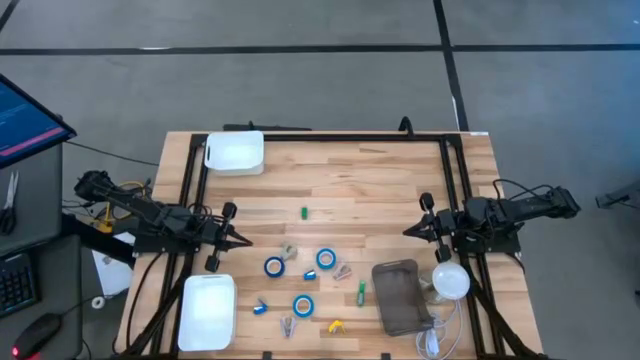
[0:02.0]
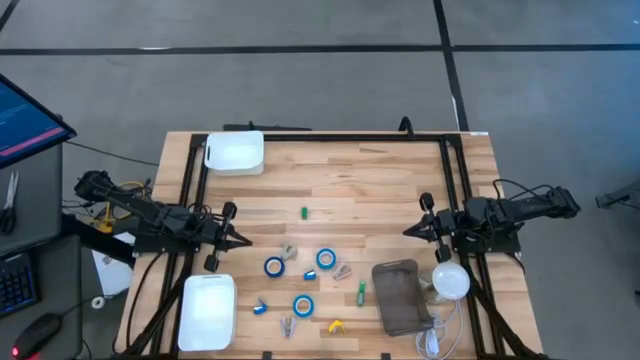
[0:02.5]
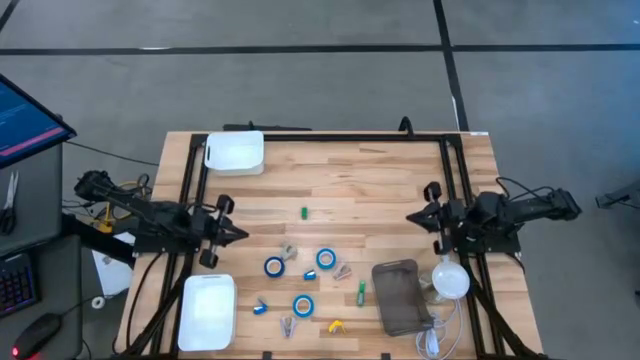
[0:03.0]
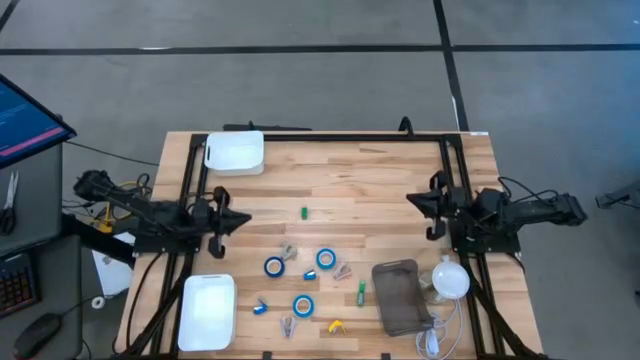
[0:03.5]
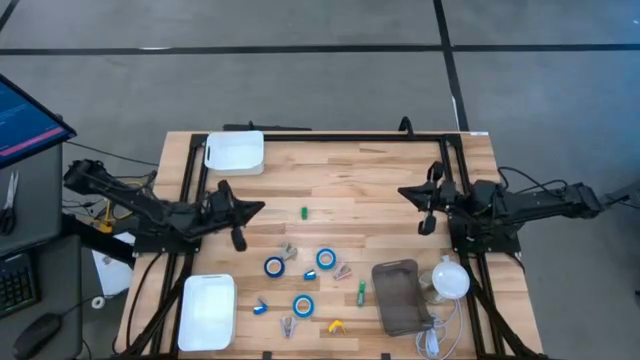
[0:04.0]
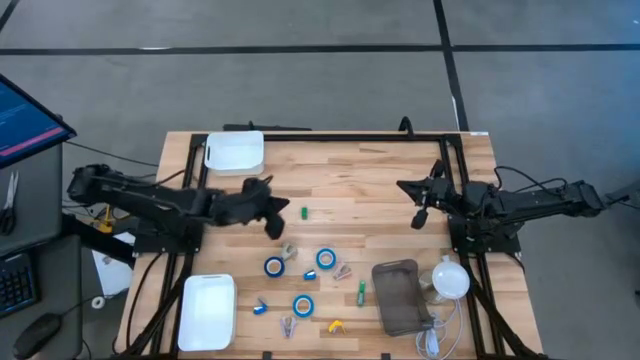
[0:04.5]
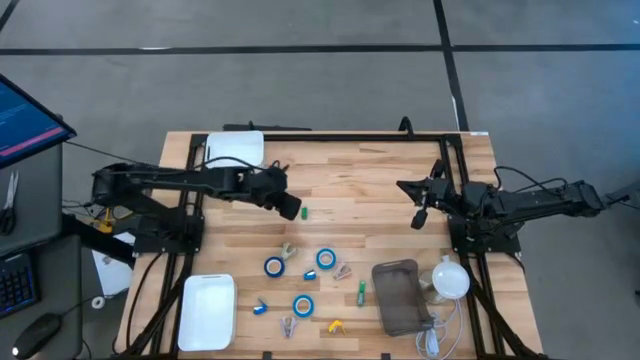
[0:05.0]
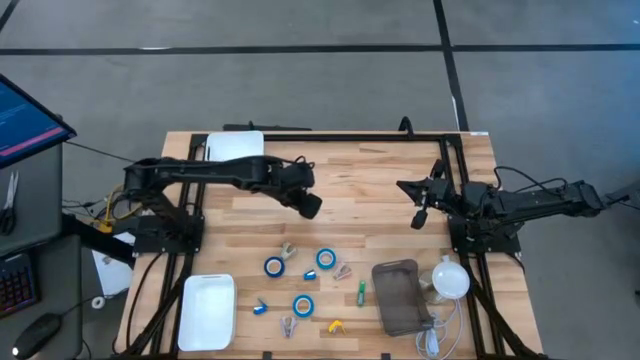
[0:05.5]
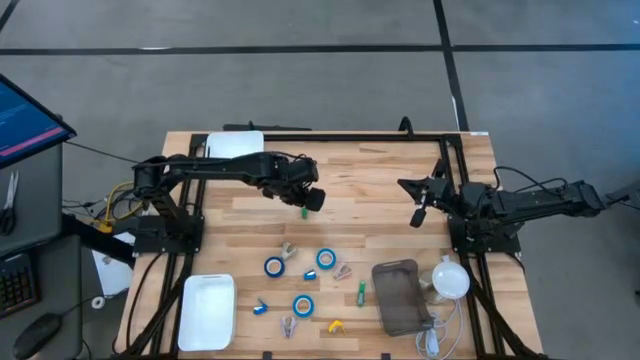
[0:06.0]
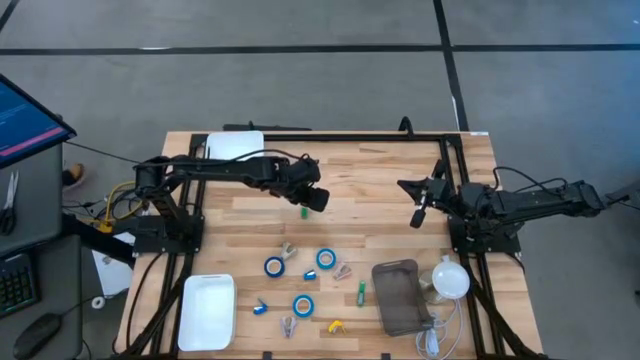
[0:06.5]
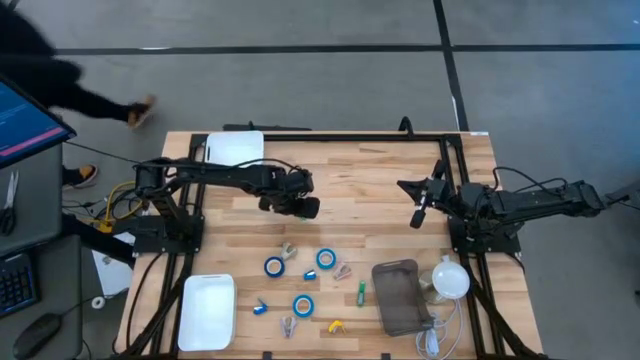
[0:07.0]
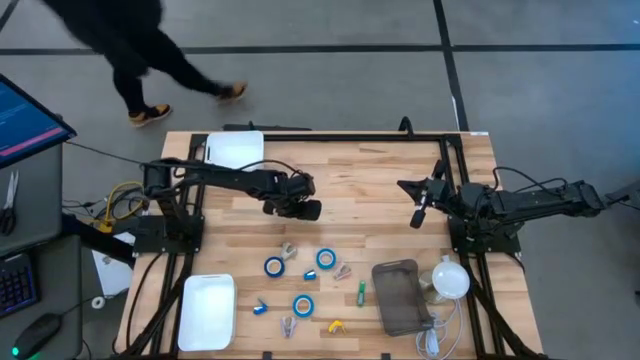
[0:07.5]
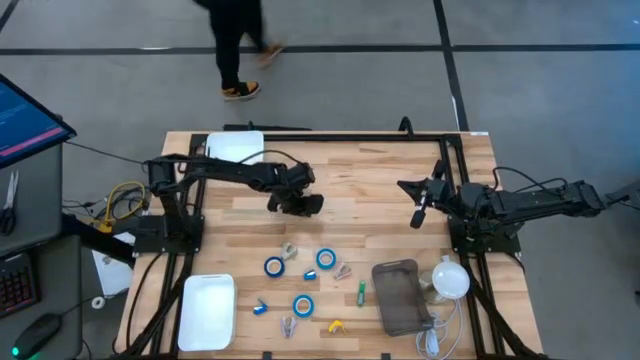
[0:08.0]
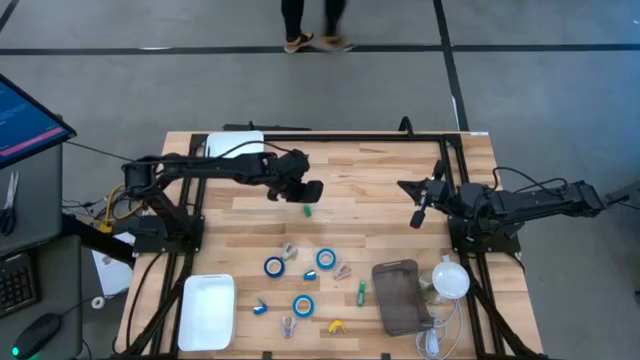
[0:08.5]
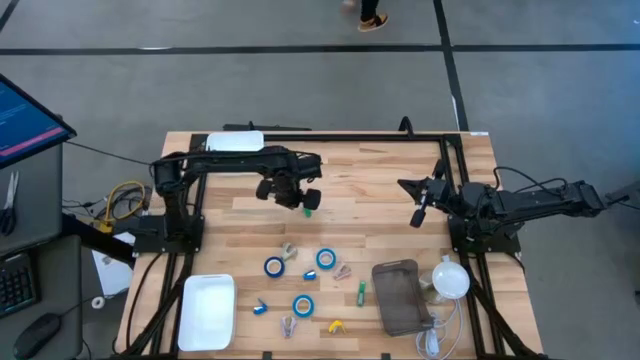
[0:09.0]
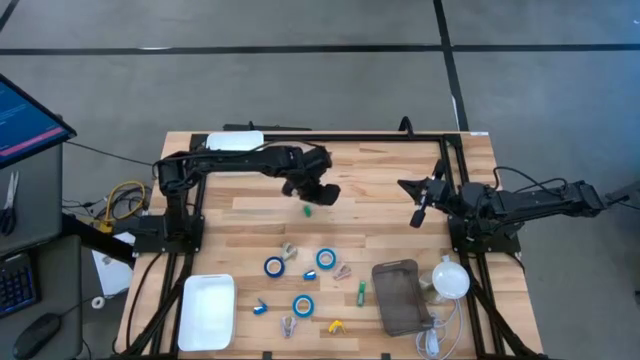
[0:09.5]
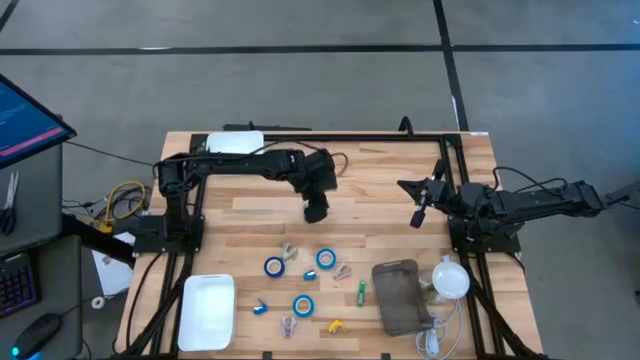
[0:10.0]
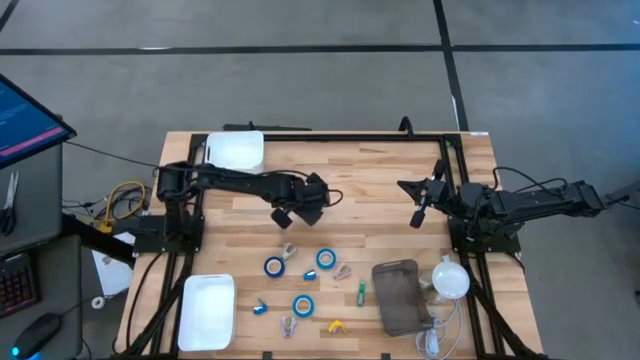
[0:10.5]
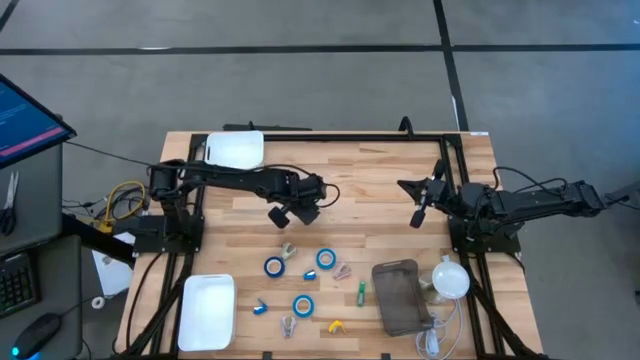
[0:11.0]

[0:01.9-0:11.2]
Task: Pick and place Stapler, Stapler remover, tape
Put the top green stapler into the top white bin

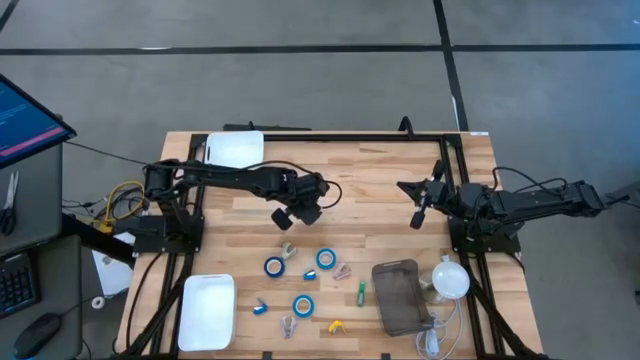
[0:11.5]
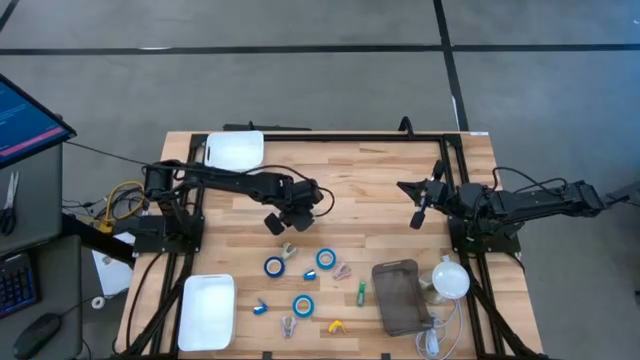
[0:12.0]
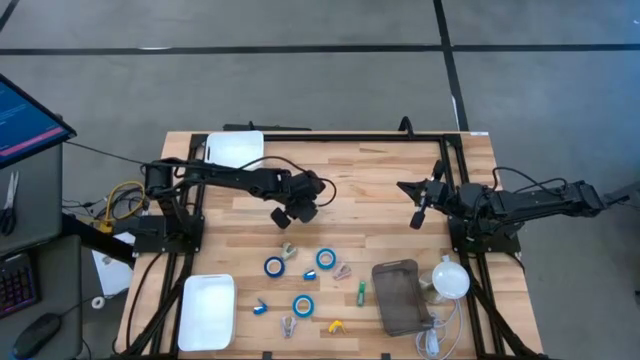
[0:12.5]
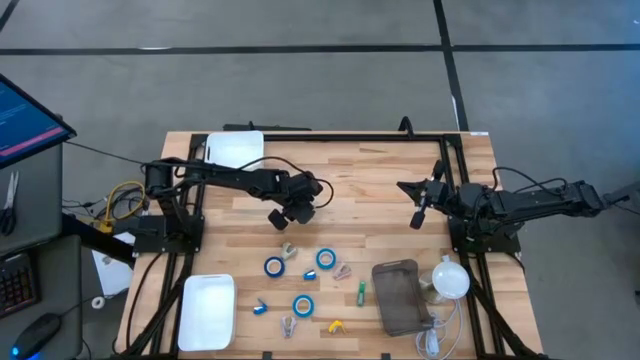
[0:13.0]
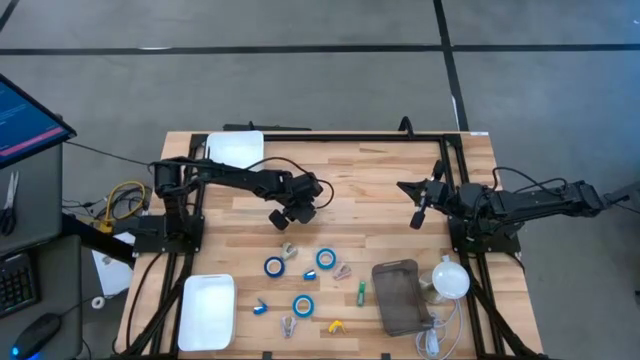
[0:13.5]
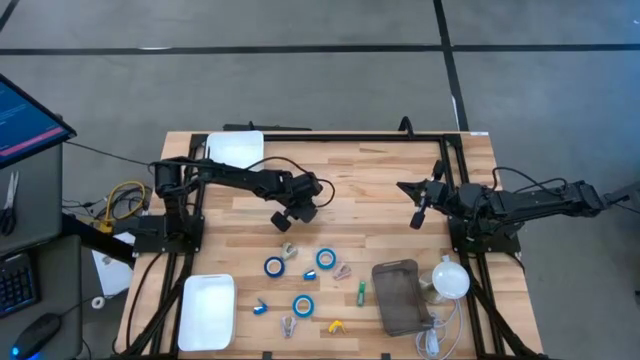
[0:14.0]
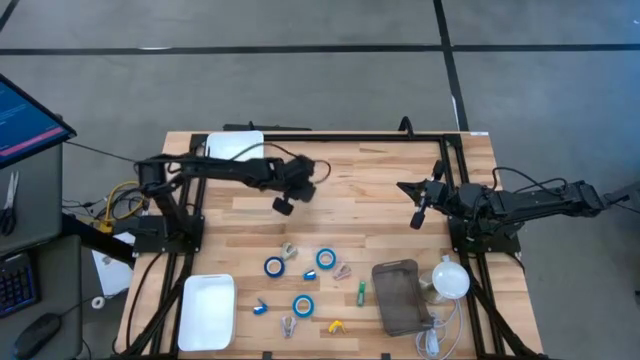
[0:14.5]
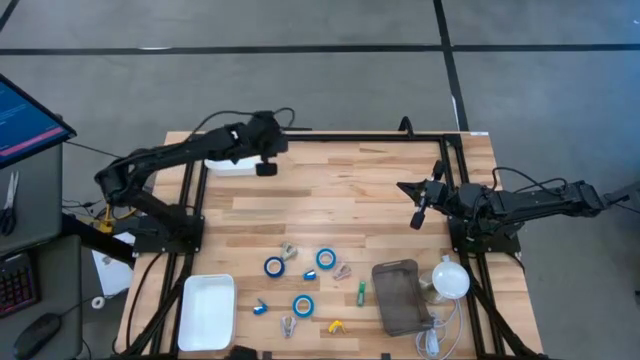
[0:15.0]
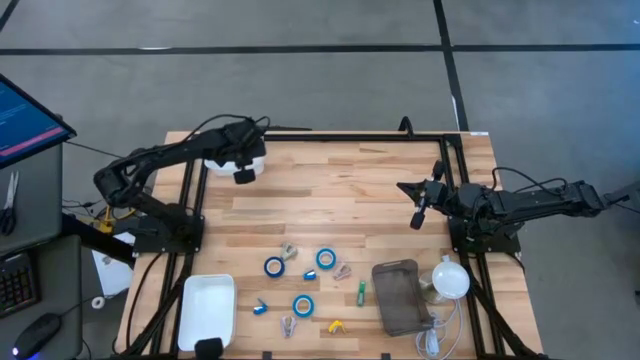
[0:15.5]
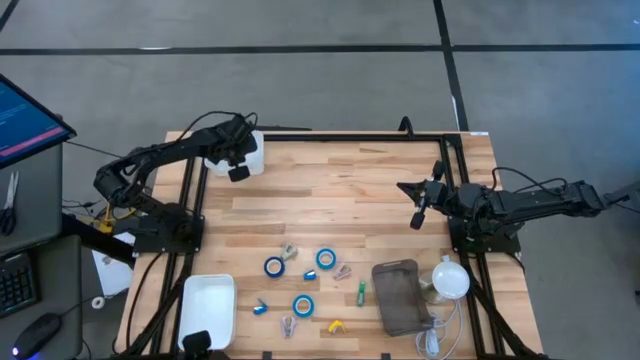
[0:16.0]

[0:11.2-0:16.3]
Put the top green stapler into the top white bin

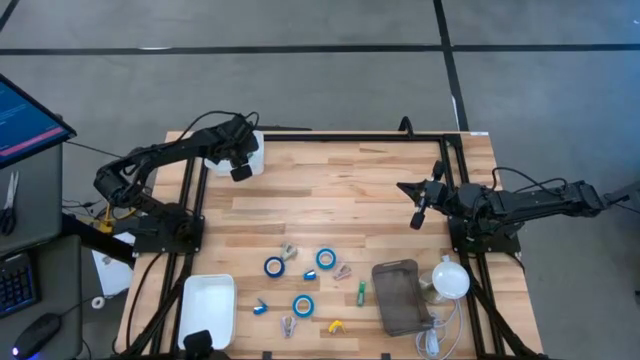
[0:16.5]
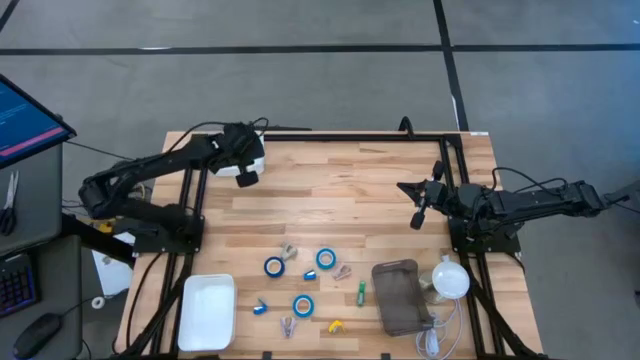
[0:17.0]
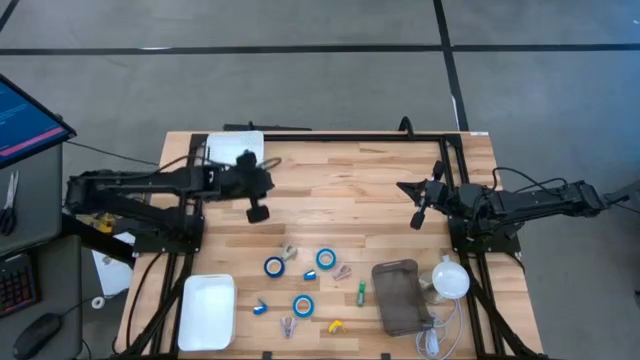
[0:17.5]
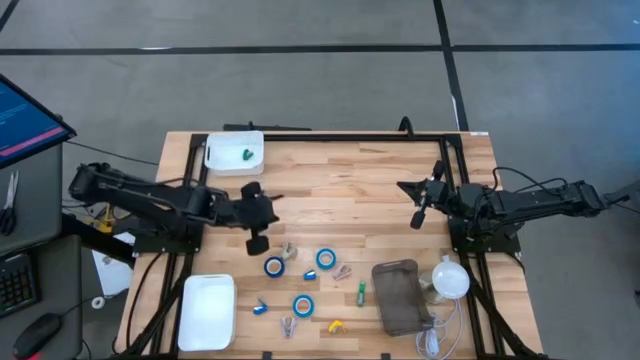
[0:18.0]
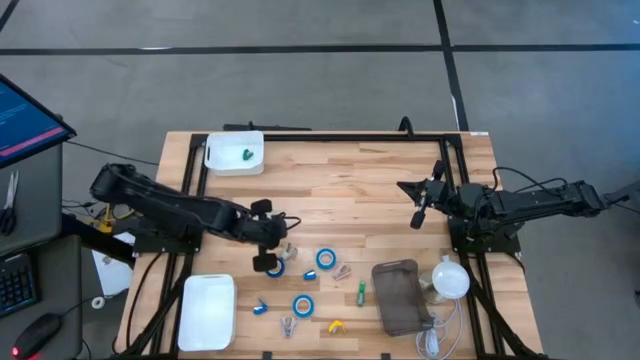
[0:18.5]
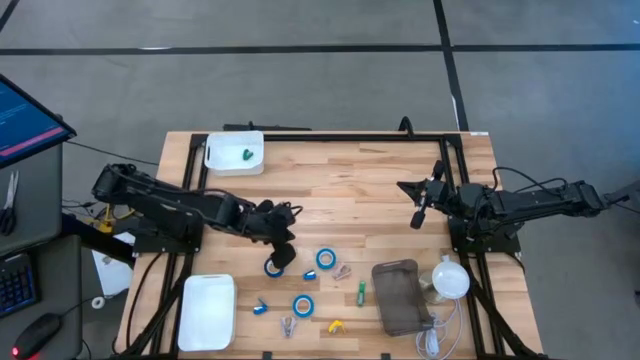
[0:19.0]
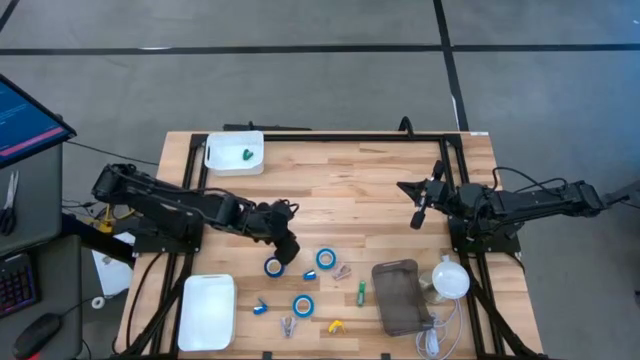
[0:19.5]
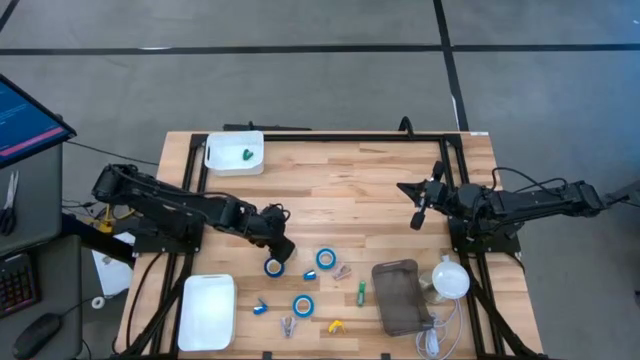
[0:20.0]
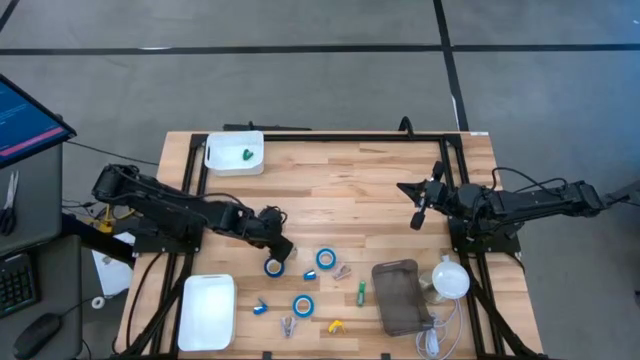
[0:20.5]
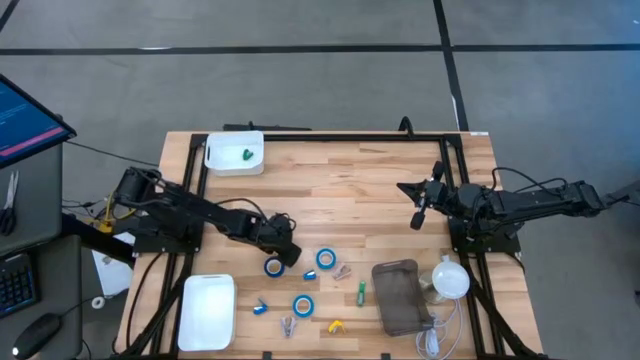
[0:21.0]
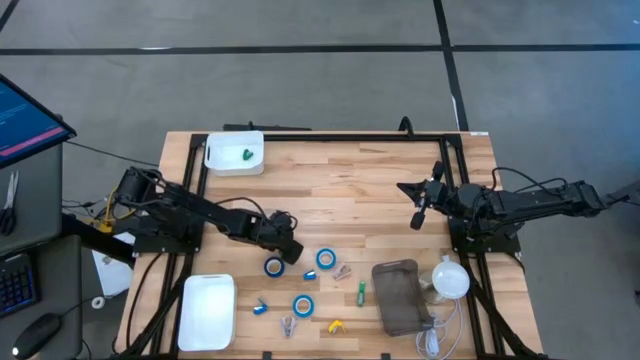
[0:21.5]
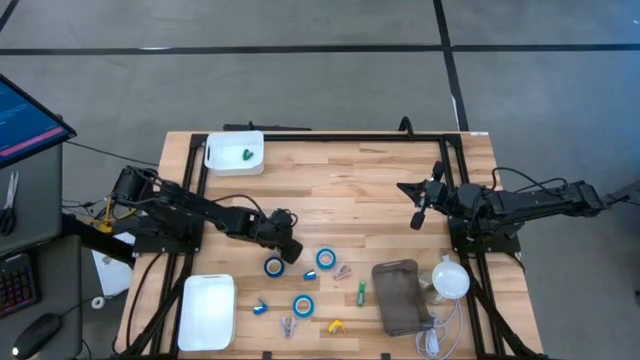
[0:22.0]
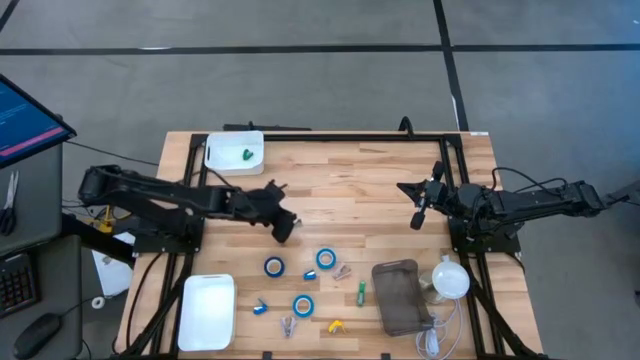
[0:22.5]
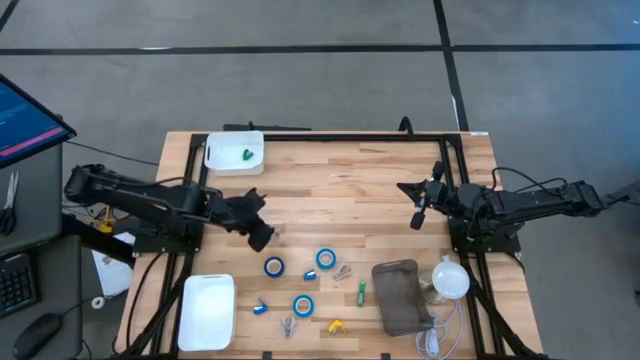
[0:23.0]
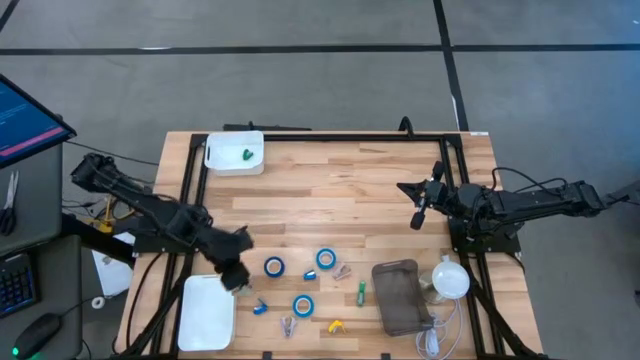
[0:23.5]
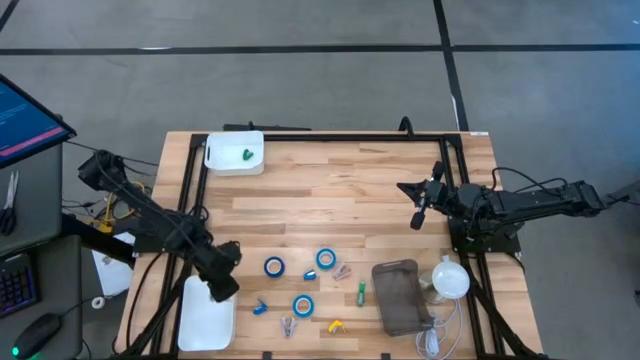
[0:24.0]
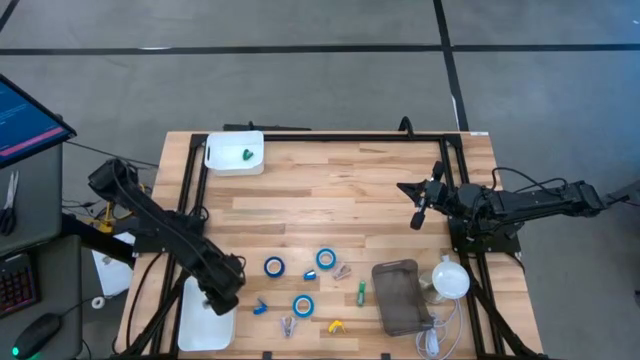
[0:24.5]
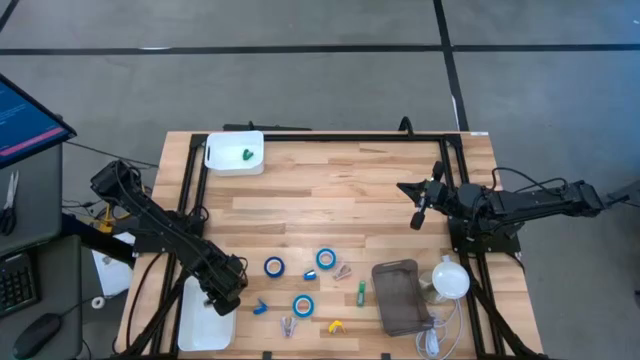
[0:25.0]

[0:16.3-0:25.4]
Put the gray staple remover into the bottom white bin
